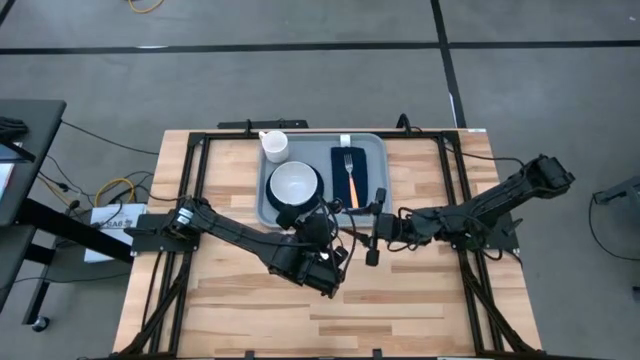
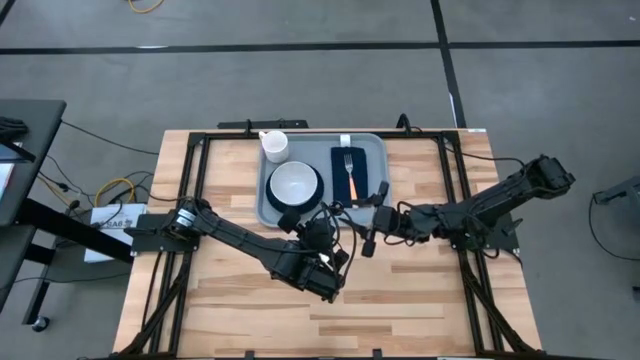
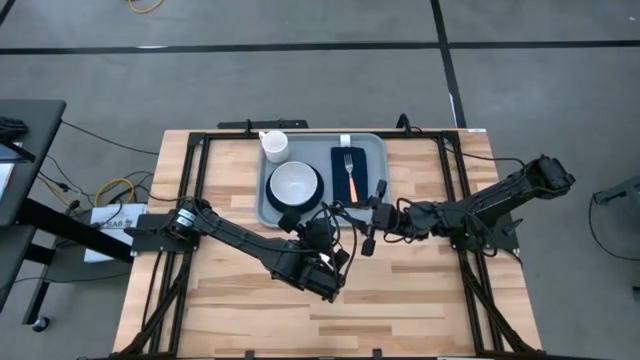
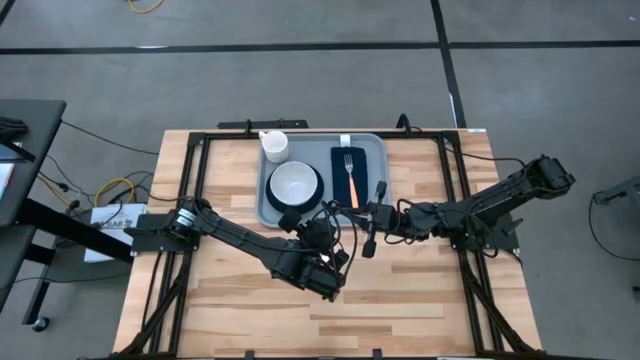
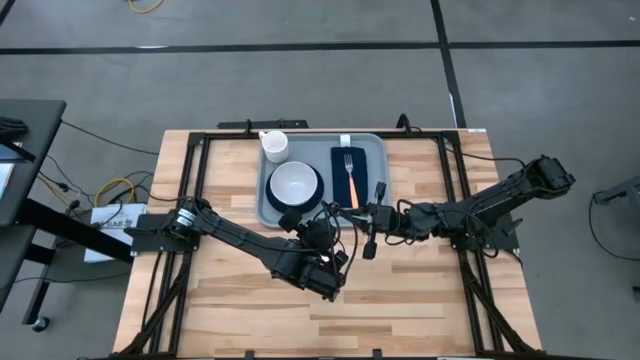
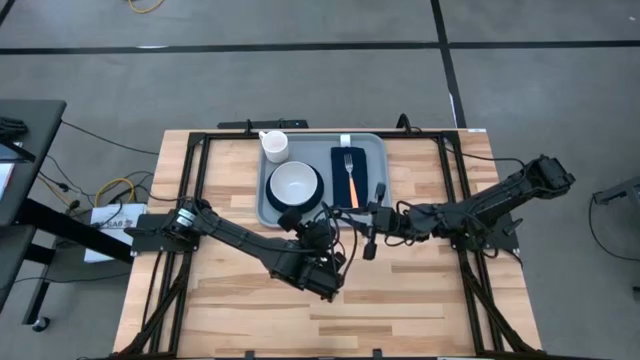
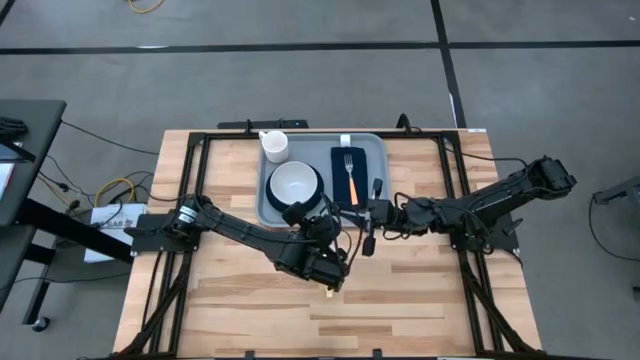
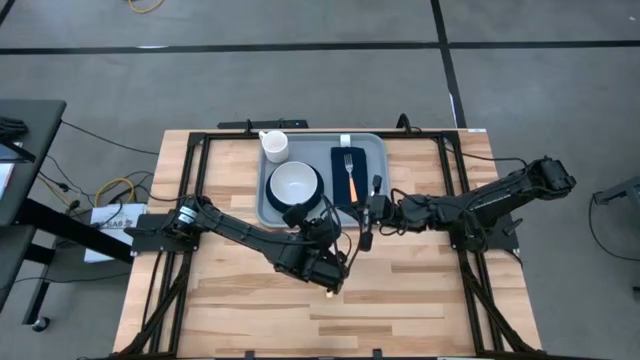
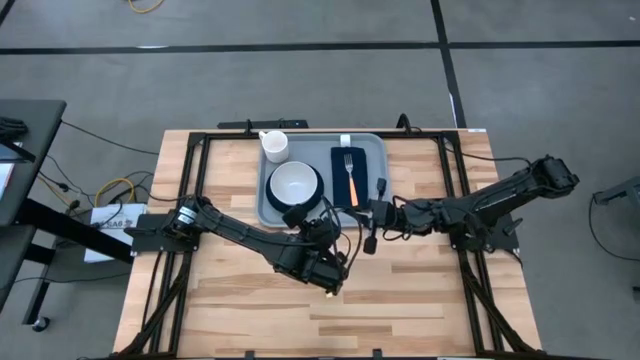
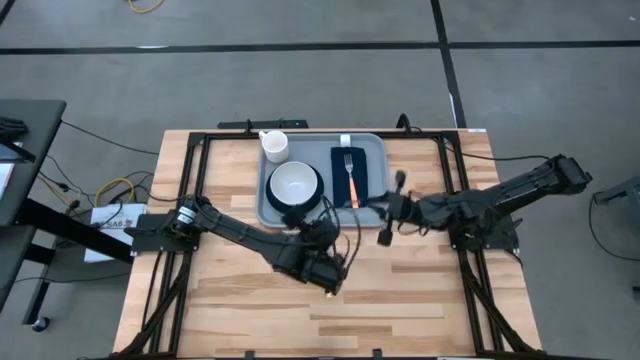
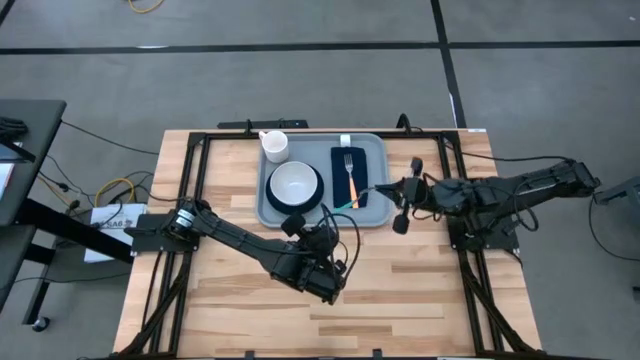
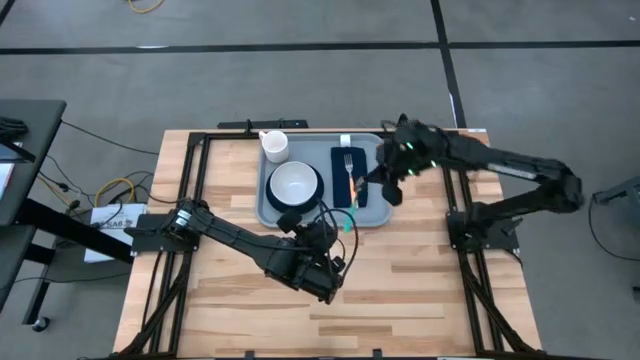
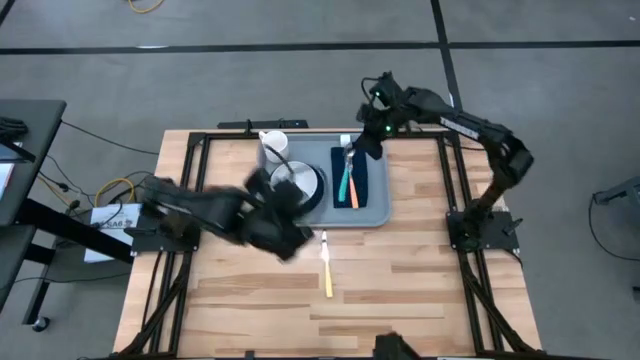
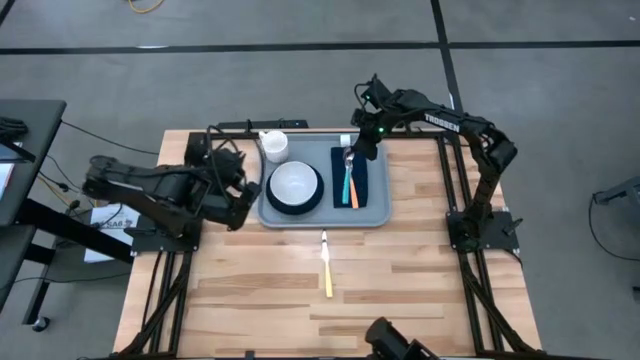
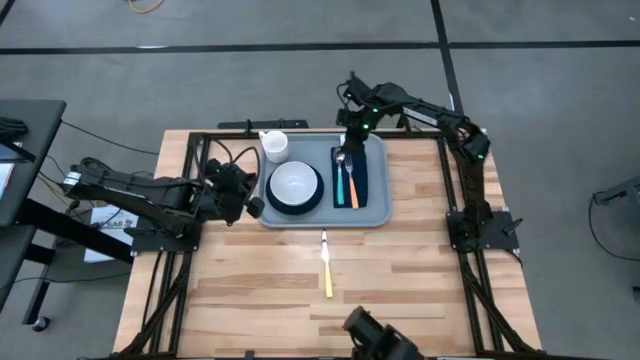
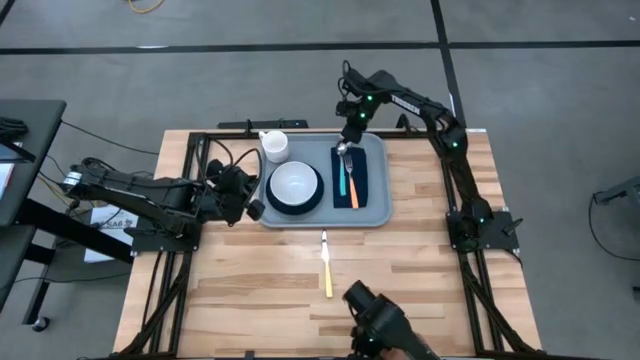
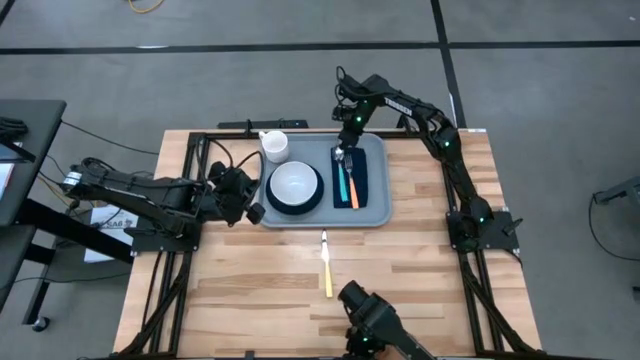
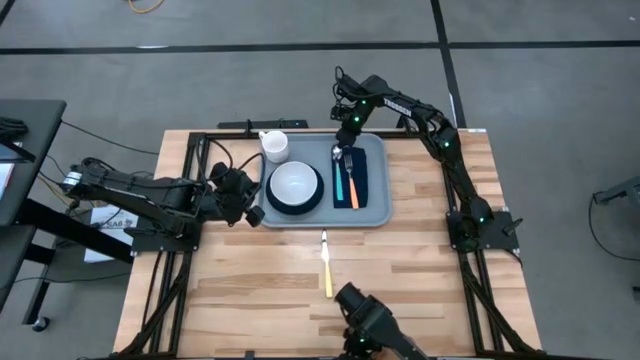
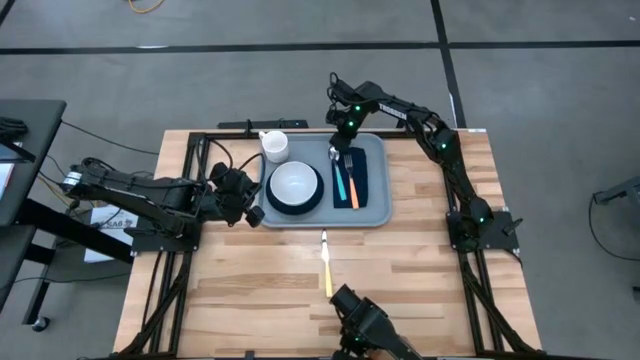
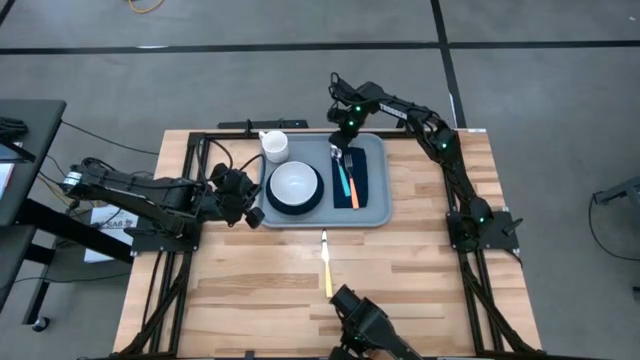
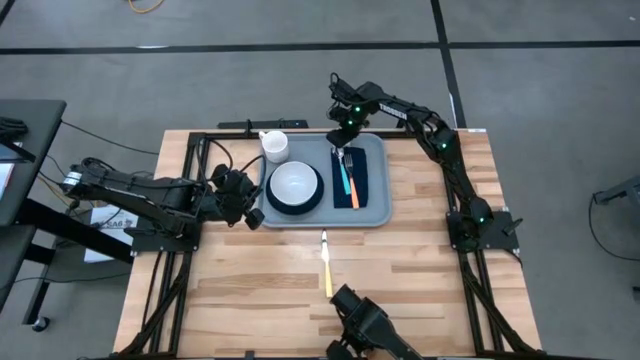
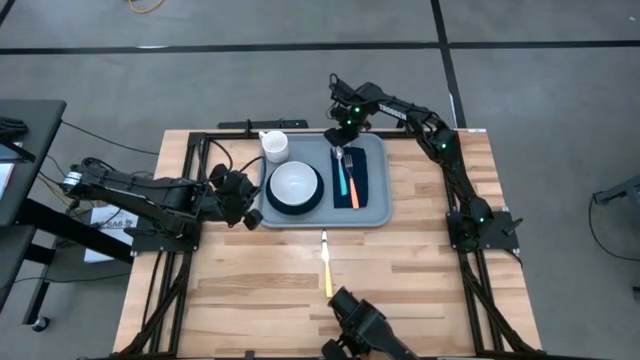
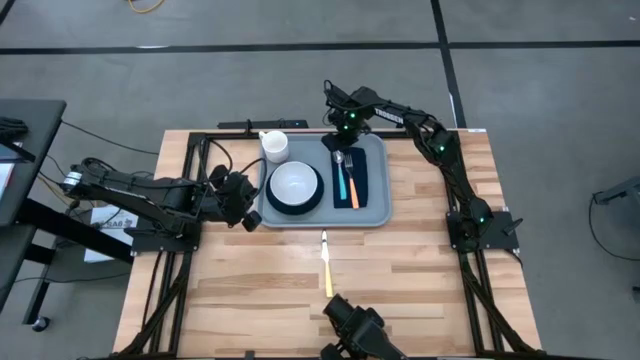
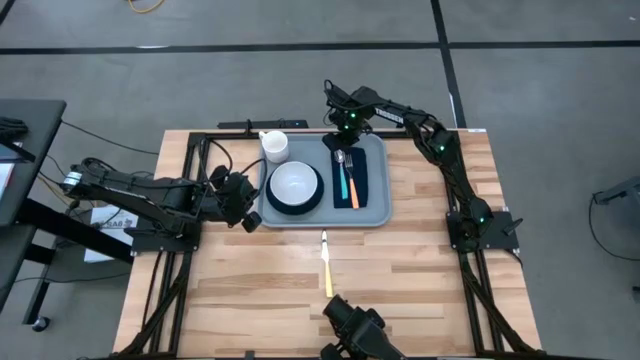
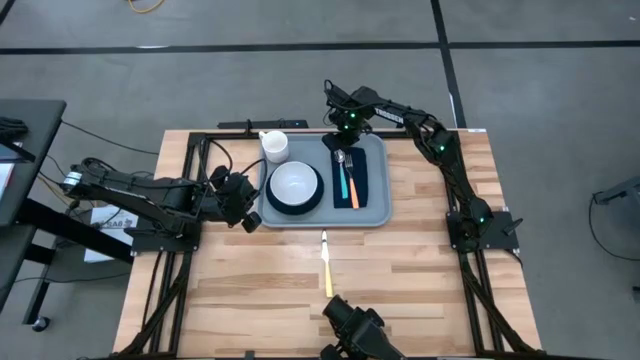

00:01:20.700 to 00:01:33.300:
Task: Set up tray
Put the blue spoon on the dark blue napkin to the left of the orange fork

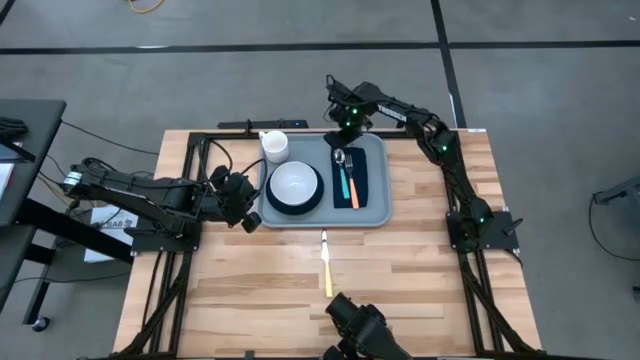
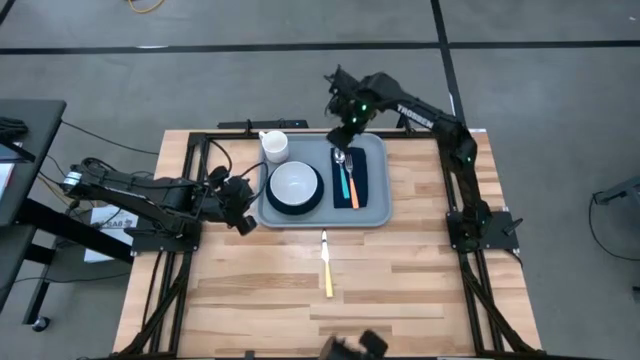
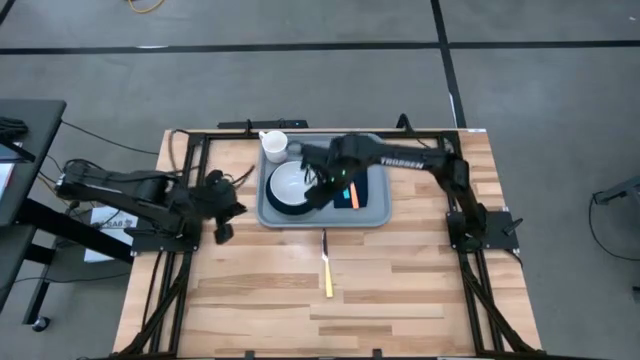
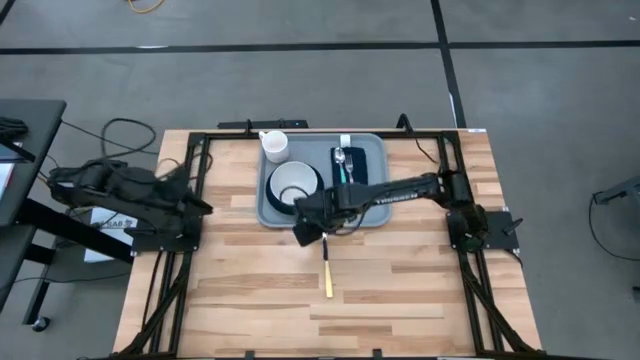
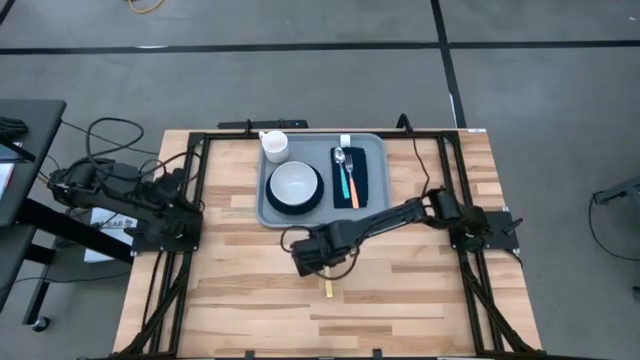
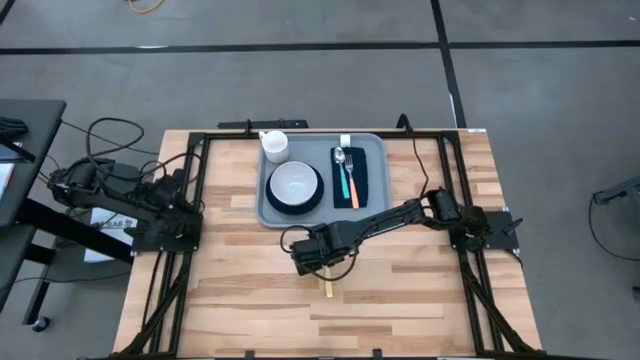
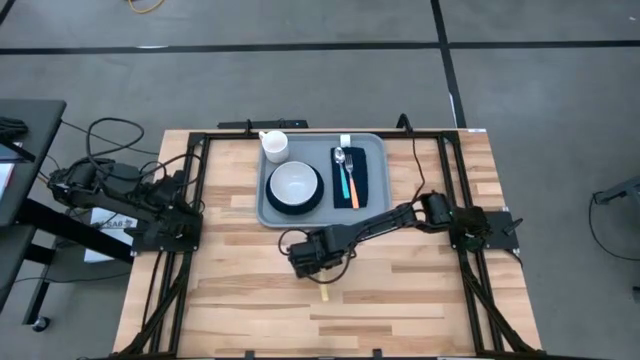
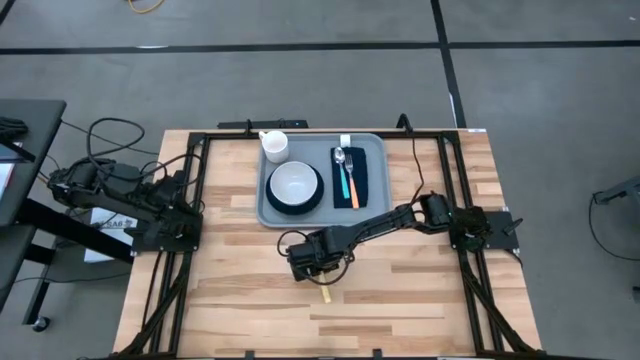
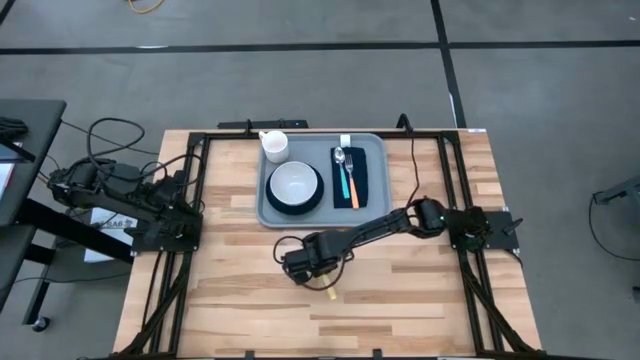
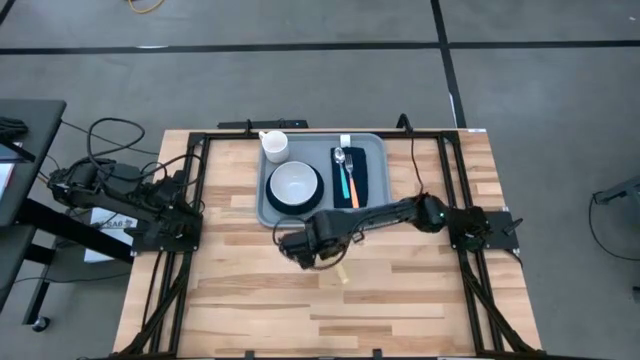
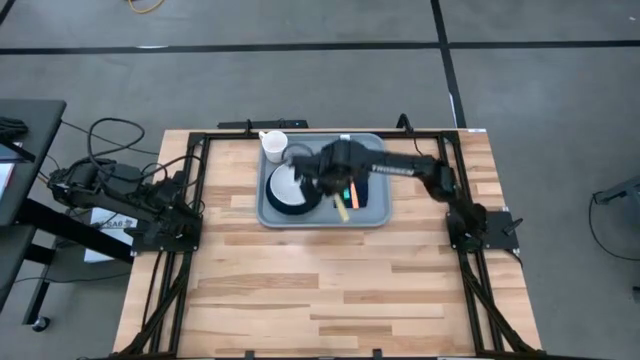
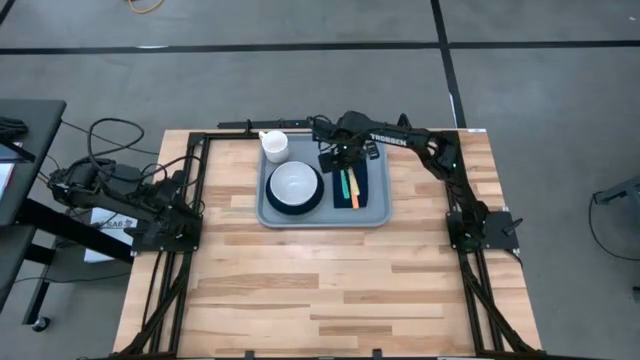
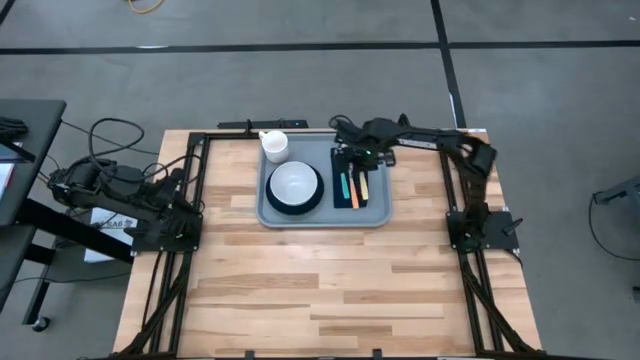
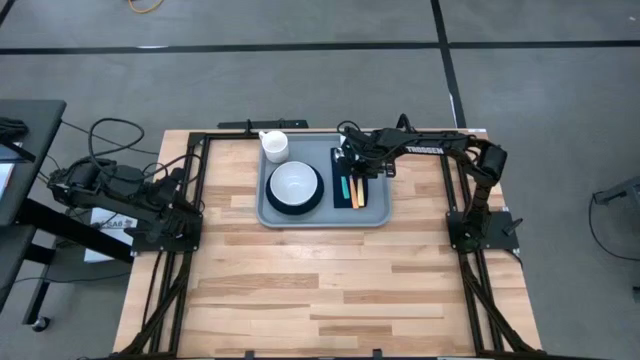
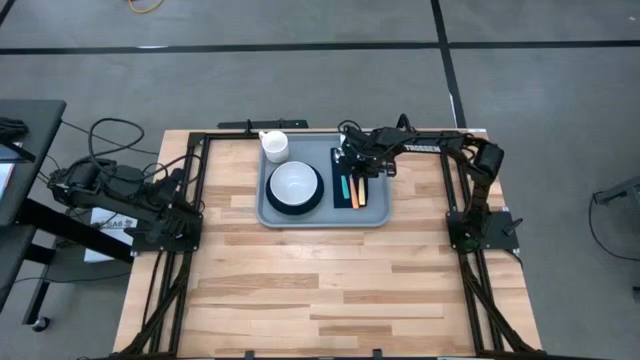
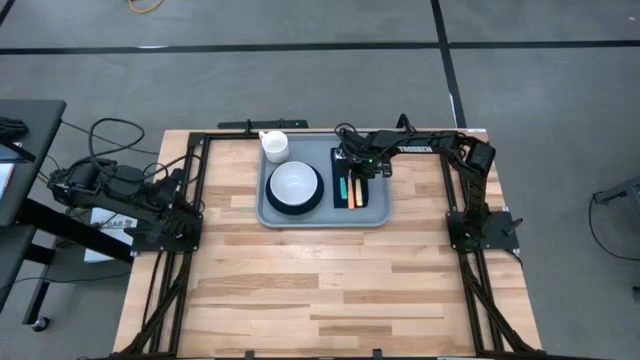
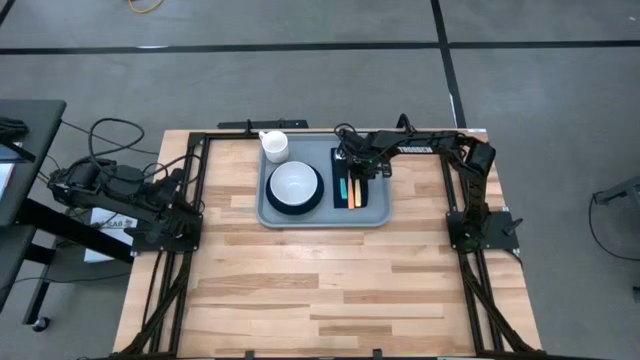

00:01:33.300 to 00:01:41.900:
Put the yellow knife on the dark blue napkin to the right of the orange fork
